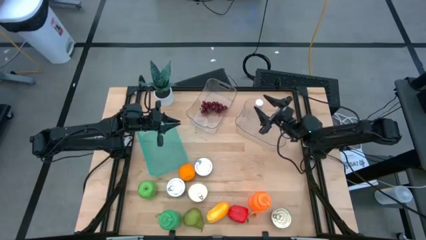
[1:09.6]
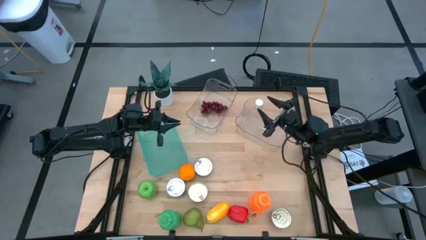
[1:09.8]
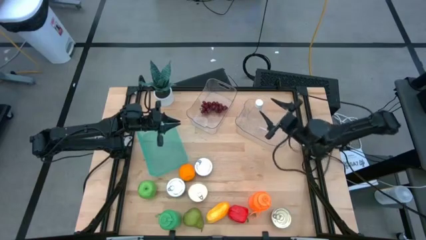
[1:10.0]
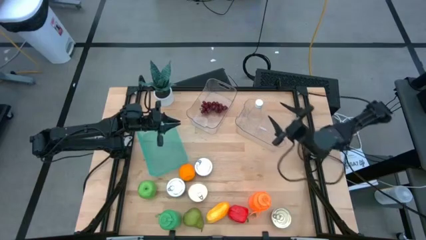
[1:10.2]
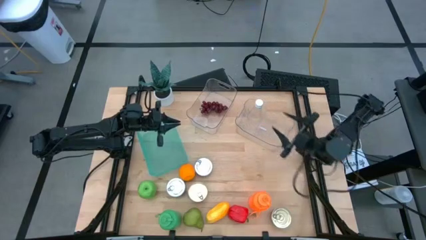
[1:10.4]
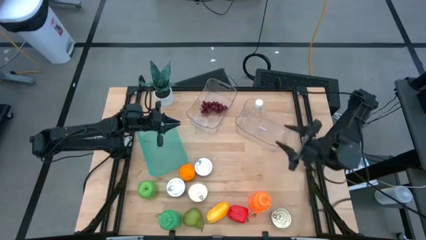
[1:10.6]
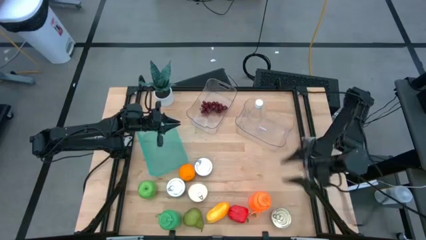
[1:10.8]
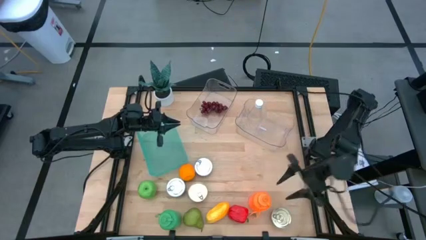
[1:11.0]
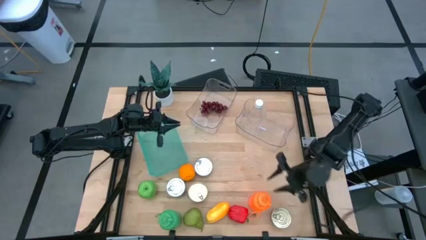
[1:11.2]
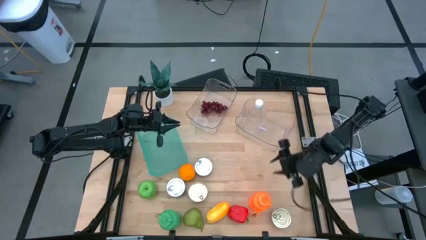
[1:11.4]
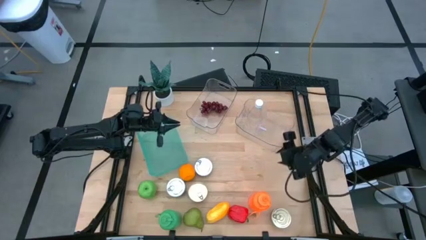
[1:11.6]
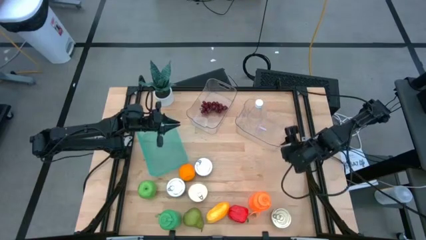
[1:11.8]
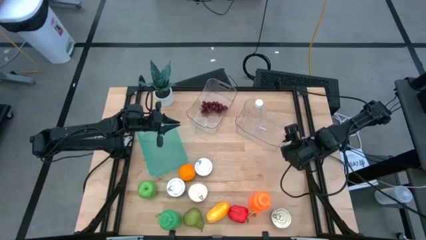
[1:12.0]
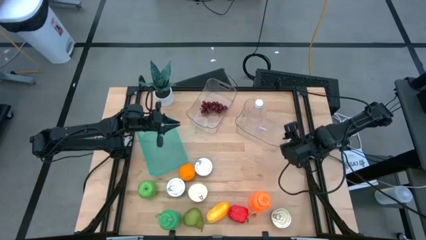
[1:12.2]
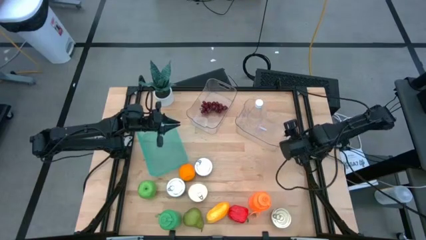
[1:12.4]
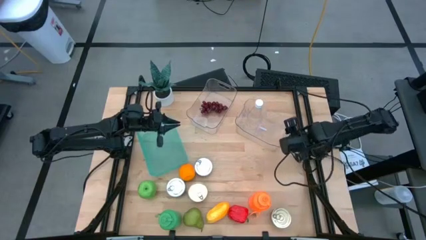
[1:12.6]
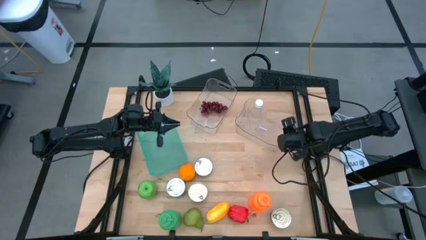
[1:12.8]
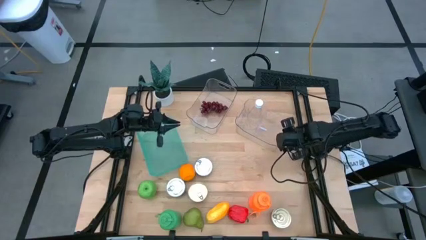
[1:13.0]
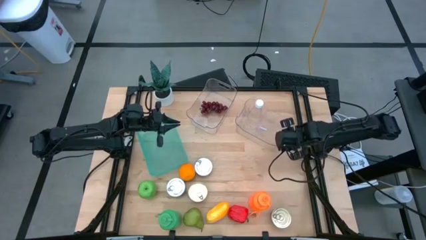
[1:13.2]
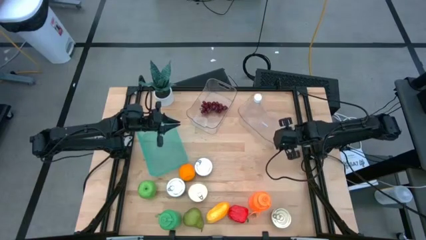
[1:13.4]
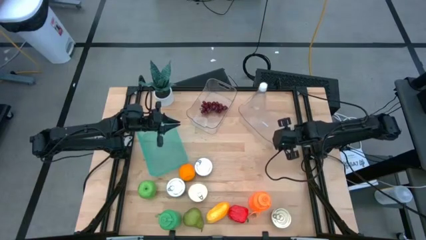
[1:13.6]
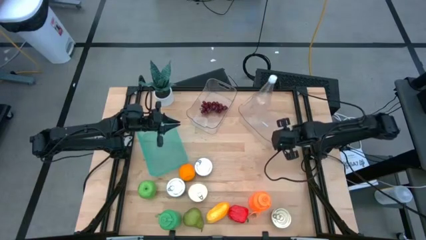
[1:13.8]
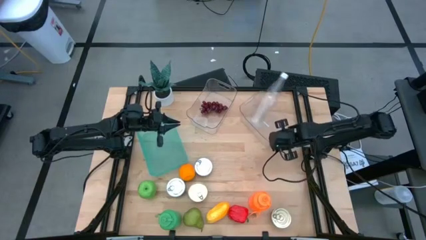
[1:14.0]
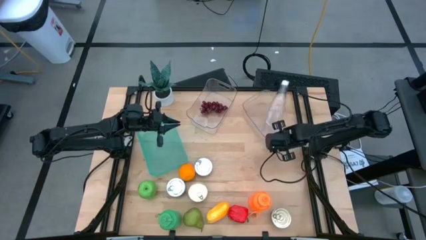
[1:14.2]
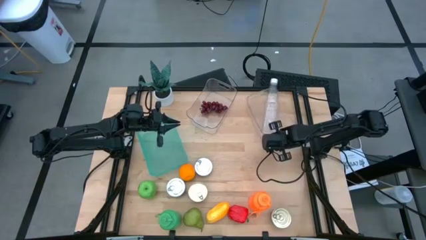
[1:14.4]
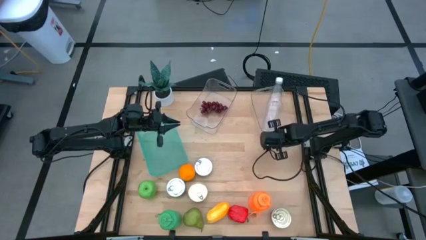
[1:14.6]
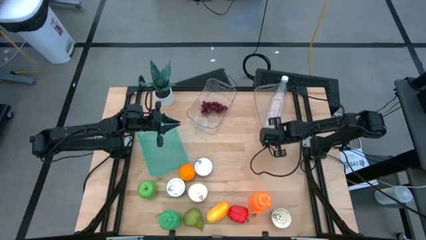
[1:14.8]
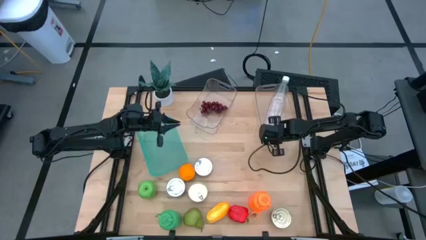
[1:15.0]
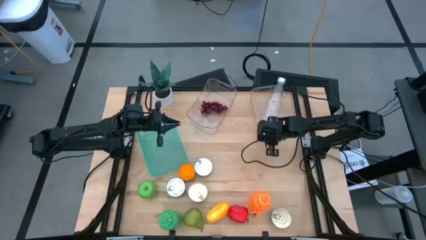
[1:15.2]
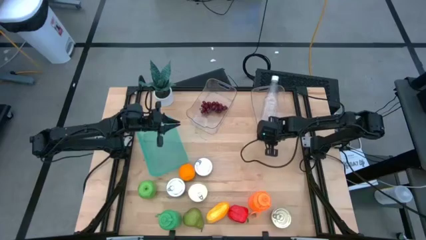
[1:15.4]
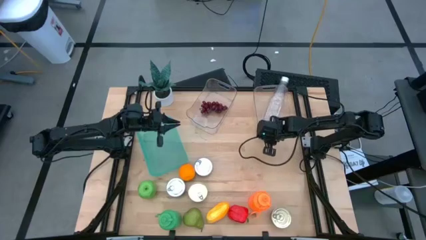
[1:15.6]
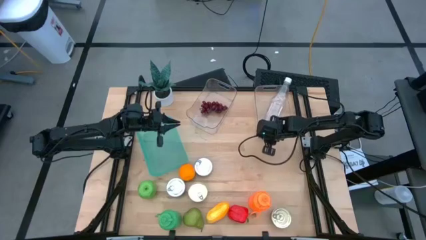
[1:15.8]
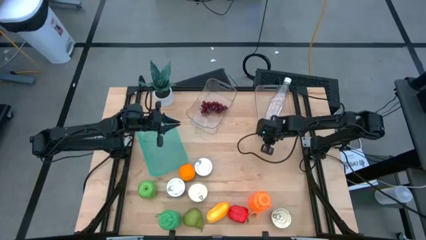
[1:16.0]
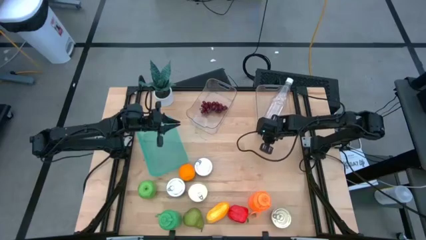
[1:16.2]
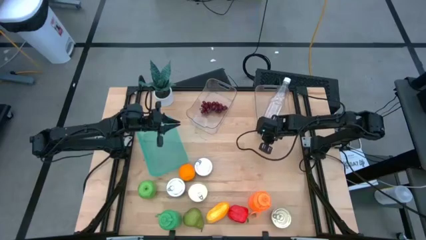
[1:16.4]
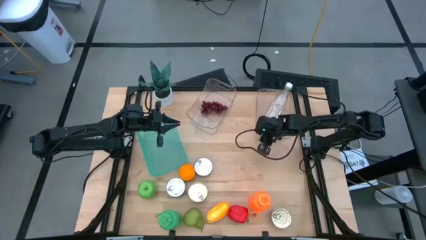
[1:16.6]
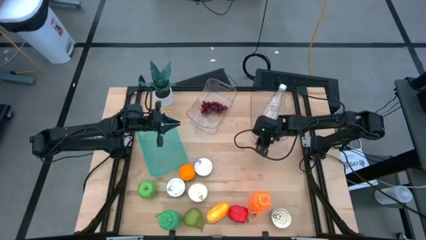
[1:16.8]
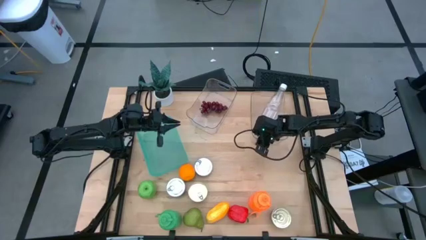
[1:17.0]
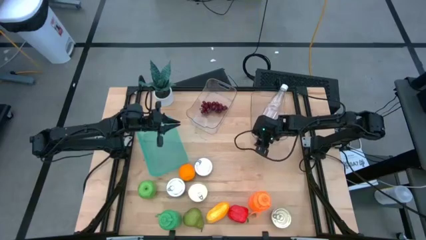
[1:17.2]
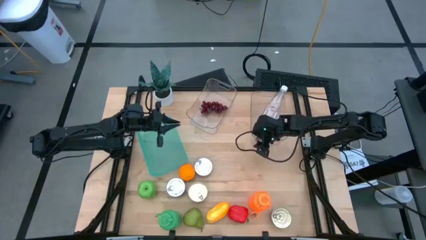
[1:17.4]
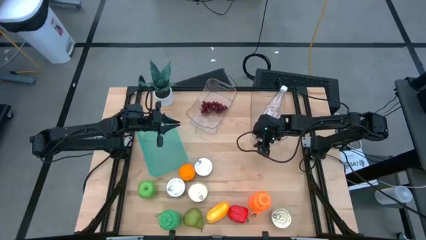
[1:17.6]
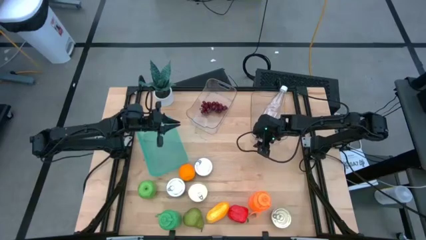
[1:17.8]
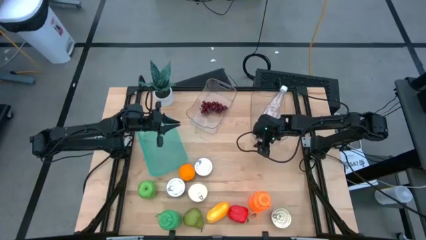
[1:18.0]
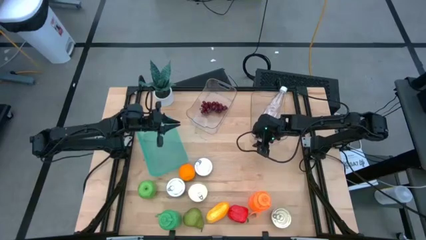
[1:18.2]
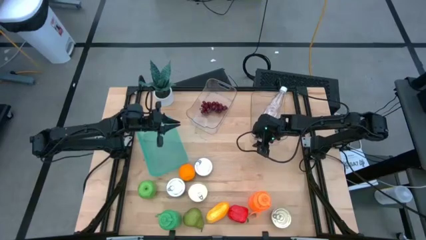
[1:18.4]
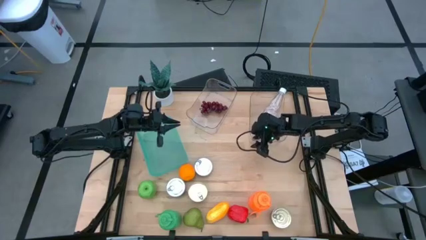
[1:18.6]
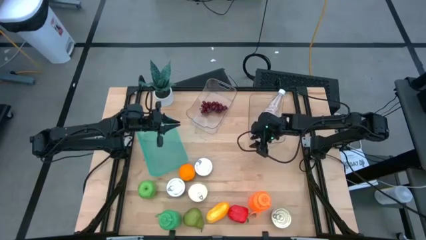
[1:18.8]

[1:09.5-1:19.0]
Task: Pick & Place Food Item
Adjust the right transparent bin on the table

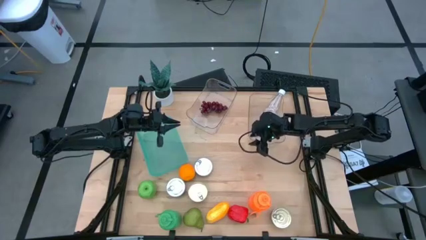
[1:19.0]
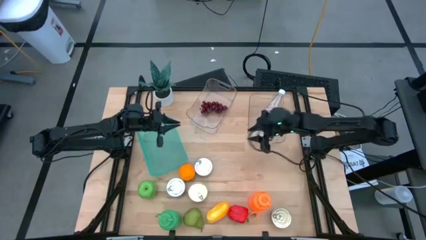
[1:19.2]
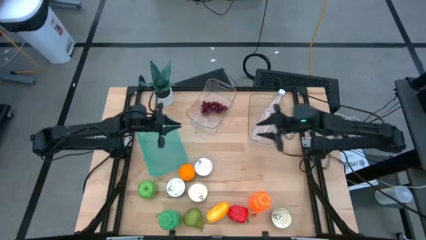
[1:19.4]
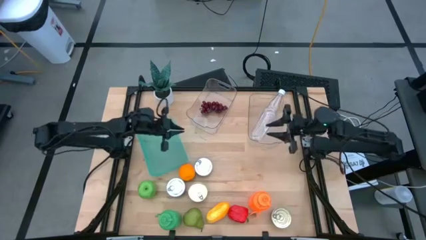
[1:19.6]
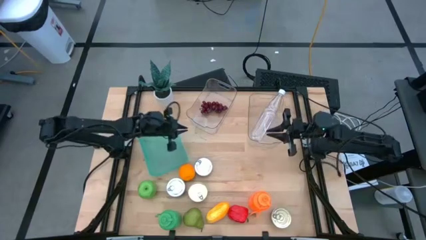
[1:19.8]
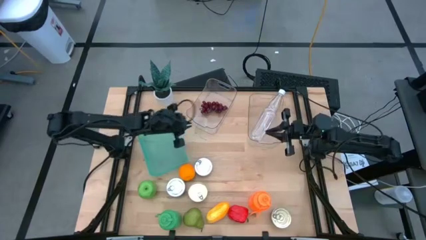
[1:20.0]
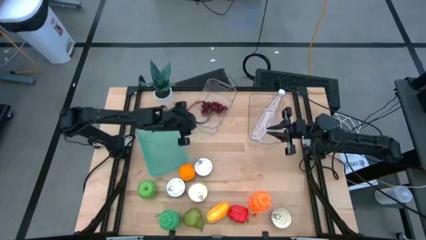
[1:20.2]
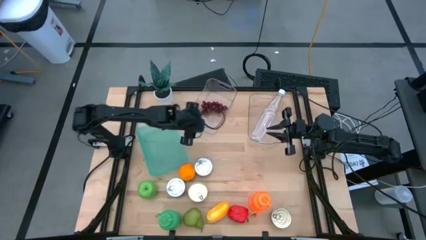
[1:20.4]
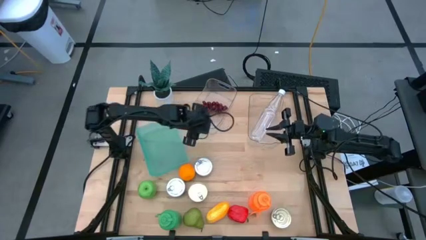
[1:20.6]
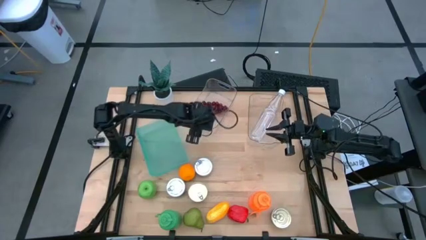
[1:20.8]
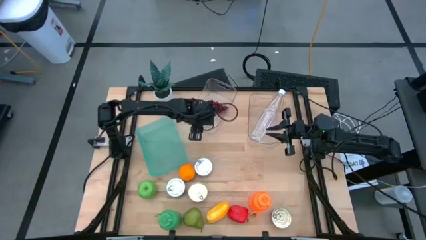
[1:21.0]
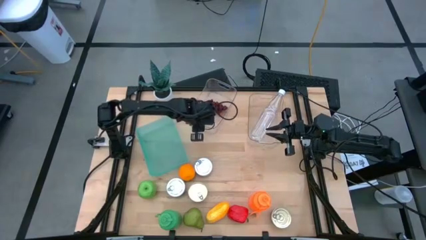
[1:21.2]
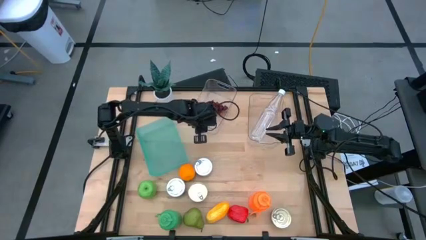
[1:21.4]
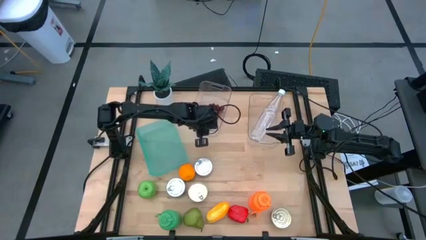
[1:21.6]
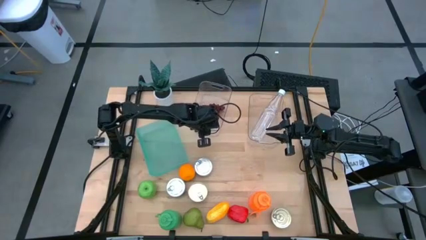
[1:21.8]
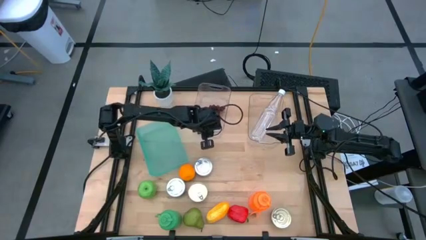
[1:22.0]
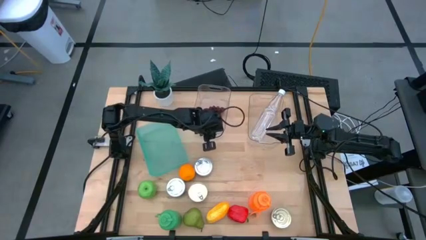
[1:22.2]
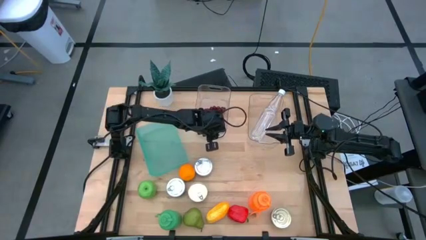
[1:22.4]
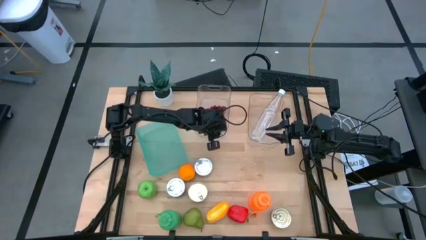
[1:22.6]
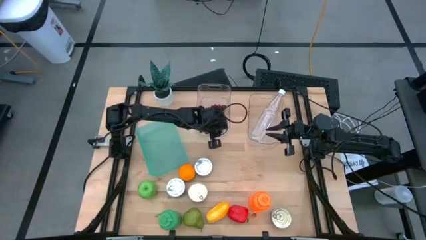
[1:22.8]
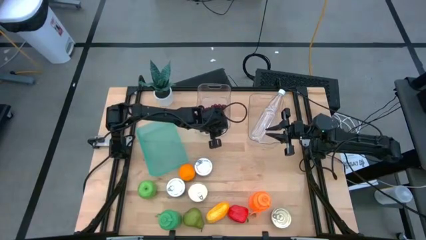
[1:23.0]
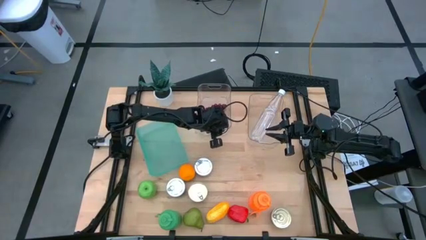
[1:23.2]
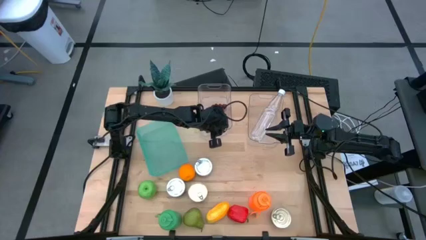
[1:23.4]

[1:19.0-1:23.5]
Adjust the left transparent bin on the table

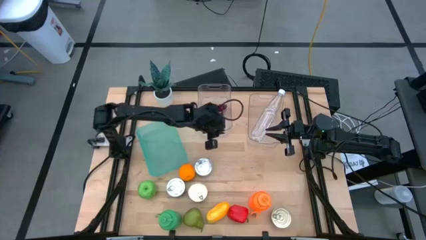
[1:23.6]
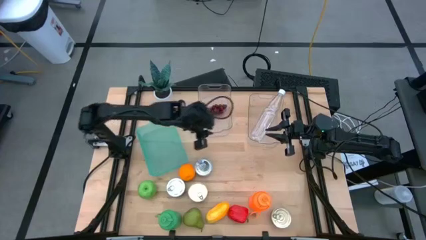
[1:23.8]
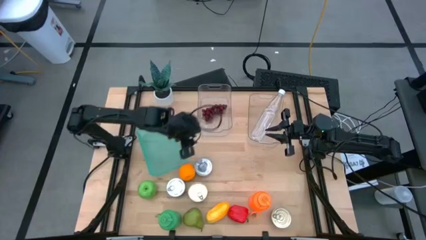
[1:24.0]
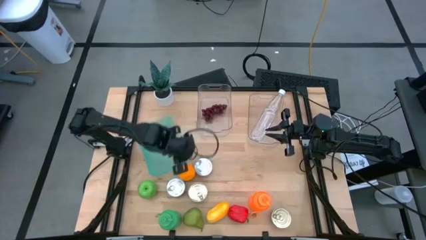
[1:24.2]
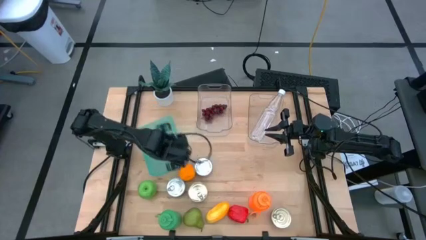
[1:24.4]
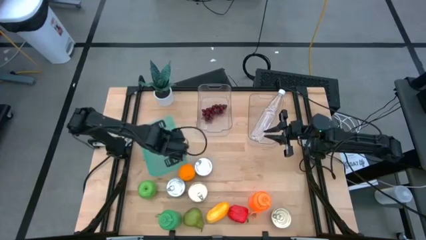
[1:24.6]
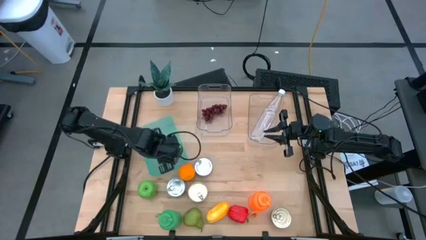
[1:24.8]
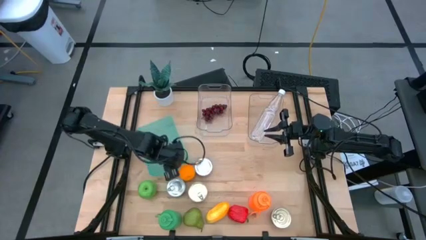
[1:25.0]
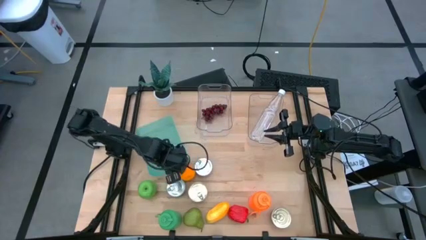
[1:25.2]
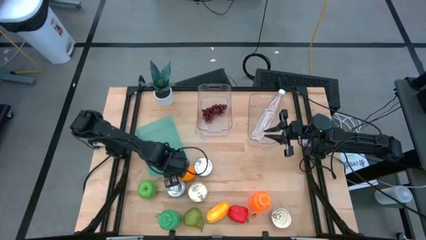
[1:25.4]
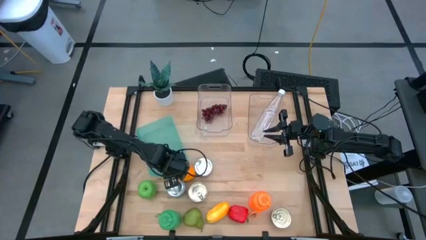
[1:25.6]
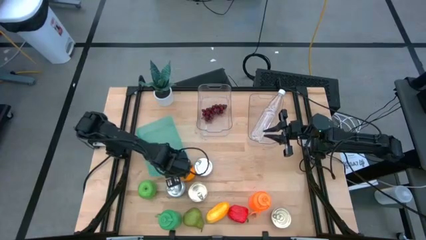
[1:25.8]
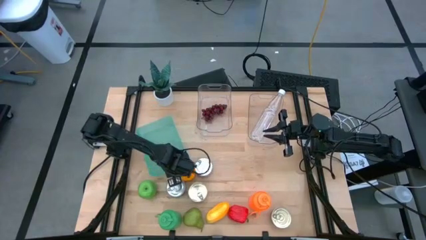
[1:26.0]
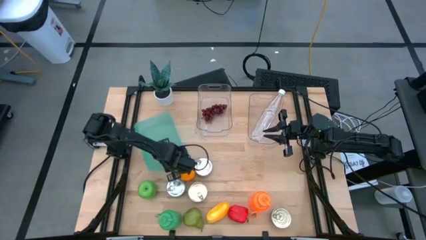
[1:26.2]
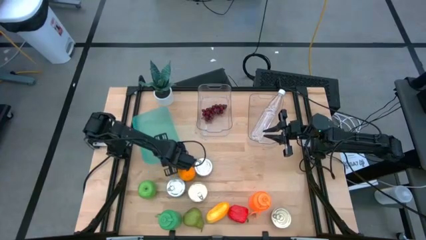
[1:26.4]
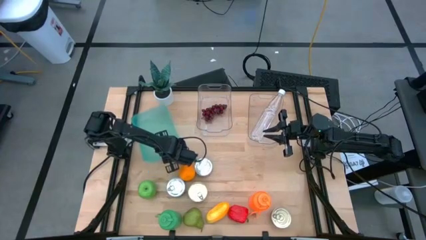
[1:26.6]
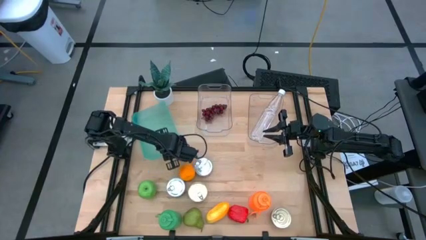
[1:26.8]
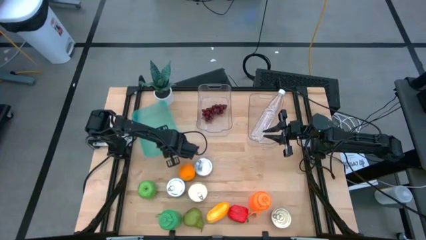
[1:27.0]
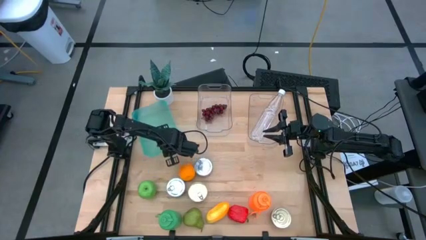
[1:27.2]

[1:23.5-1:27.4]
Adjust the blue bin on the table
